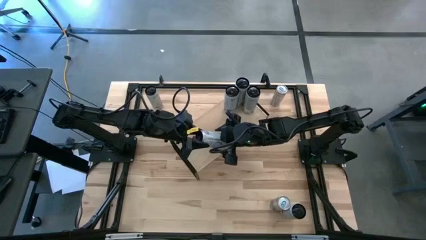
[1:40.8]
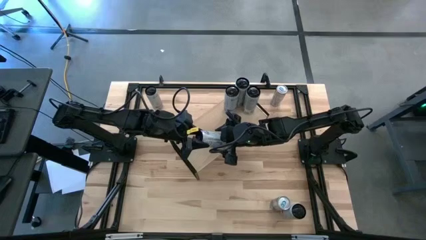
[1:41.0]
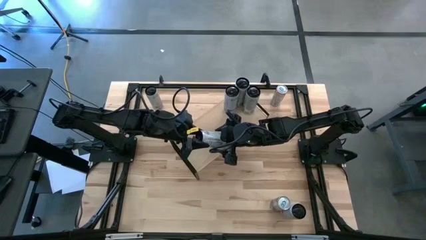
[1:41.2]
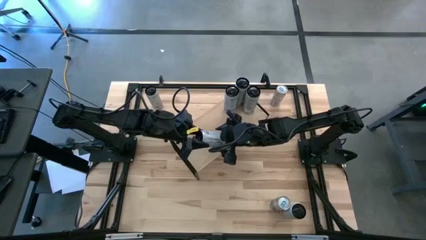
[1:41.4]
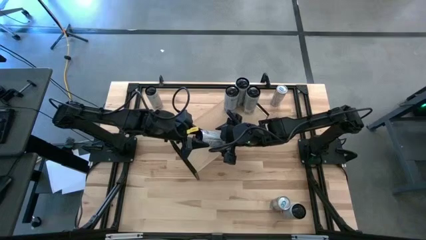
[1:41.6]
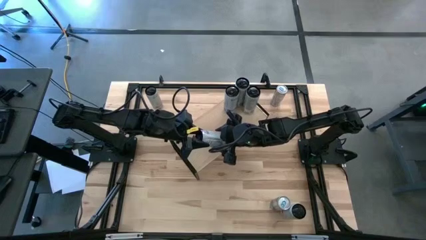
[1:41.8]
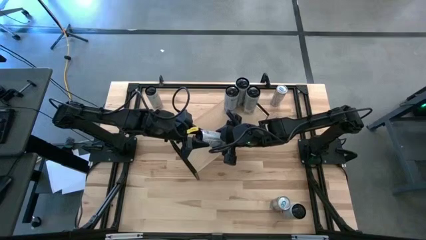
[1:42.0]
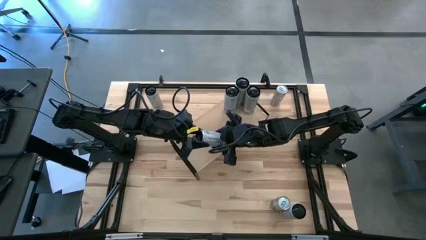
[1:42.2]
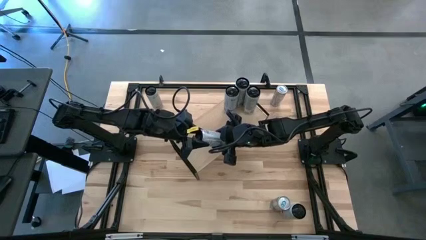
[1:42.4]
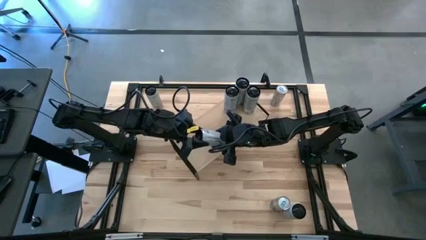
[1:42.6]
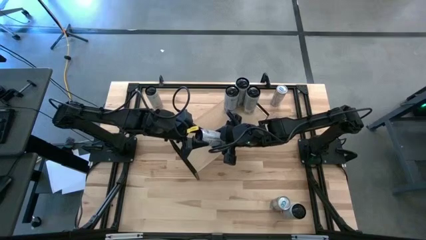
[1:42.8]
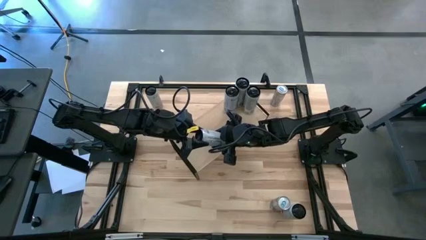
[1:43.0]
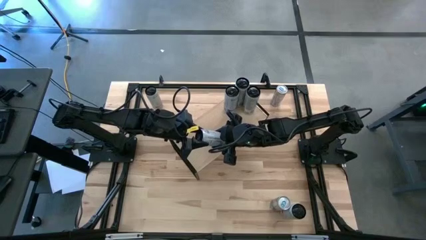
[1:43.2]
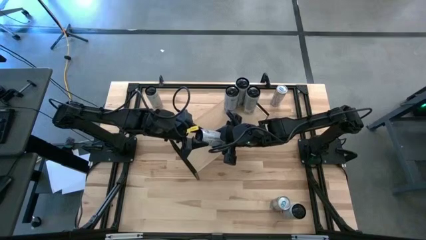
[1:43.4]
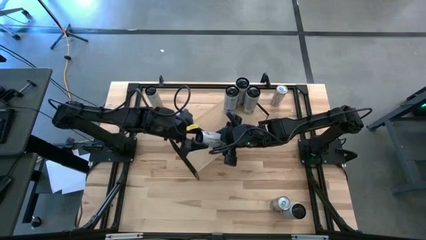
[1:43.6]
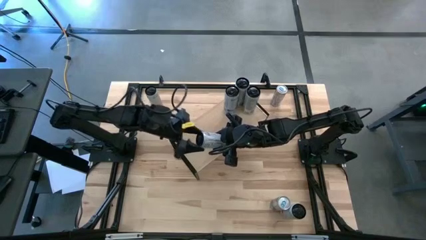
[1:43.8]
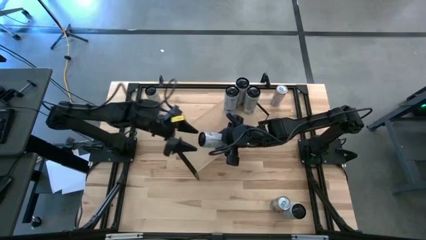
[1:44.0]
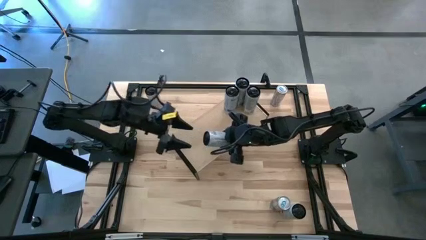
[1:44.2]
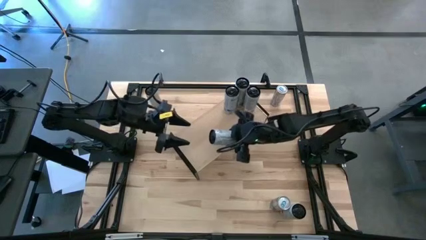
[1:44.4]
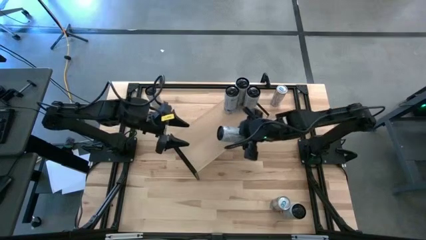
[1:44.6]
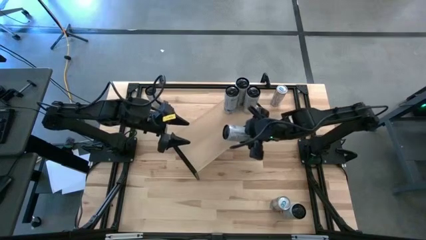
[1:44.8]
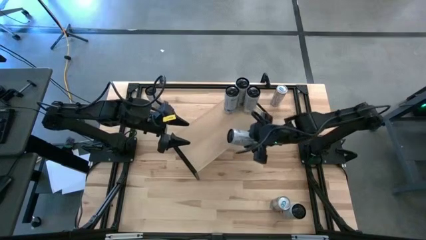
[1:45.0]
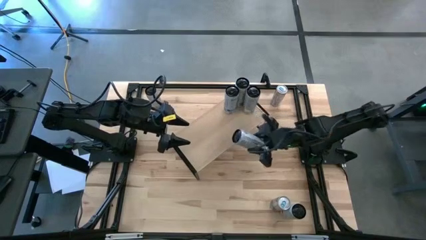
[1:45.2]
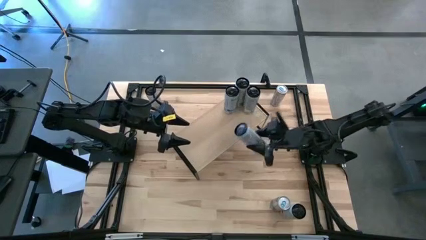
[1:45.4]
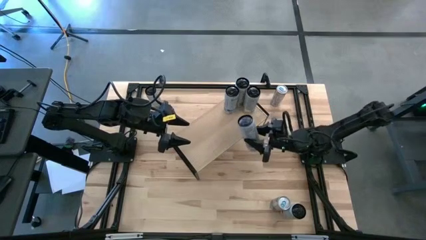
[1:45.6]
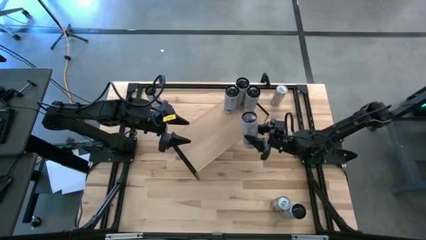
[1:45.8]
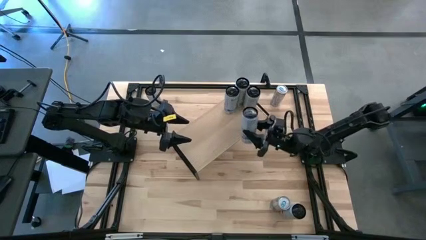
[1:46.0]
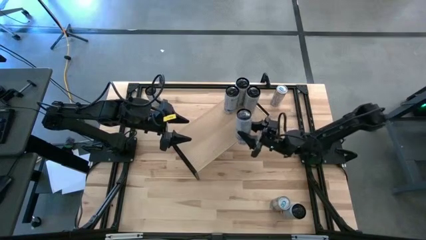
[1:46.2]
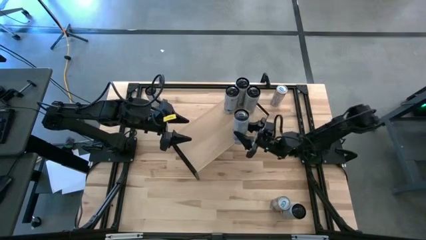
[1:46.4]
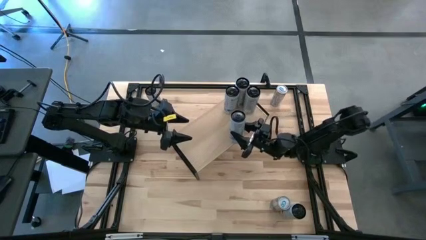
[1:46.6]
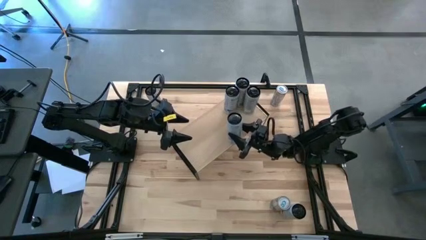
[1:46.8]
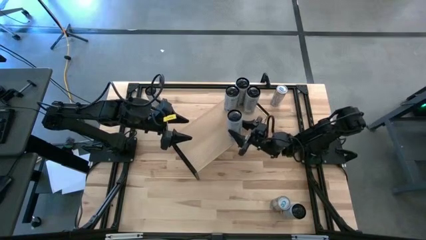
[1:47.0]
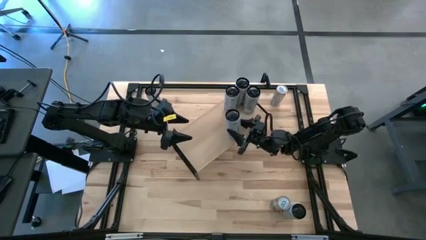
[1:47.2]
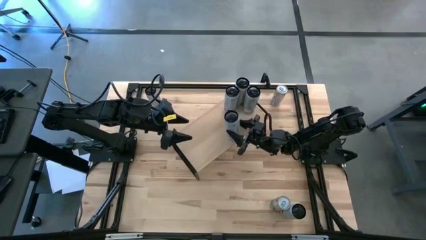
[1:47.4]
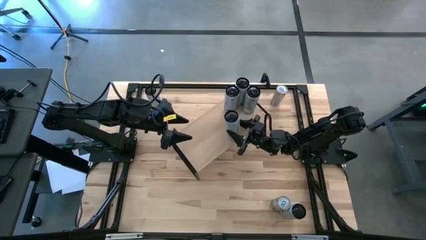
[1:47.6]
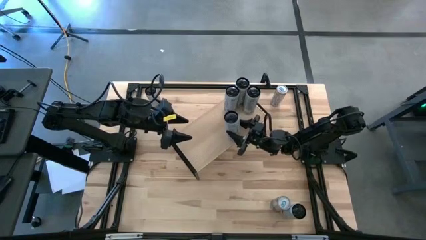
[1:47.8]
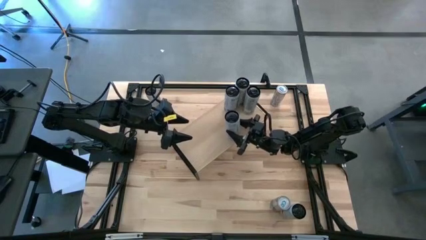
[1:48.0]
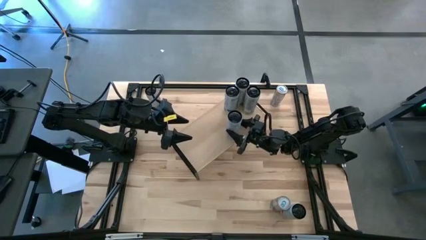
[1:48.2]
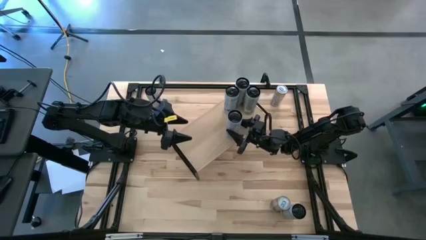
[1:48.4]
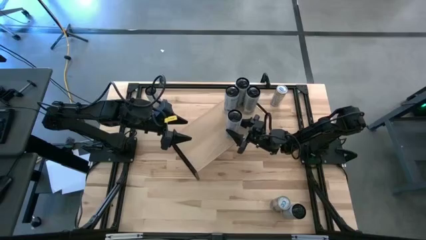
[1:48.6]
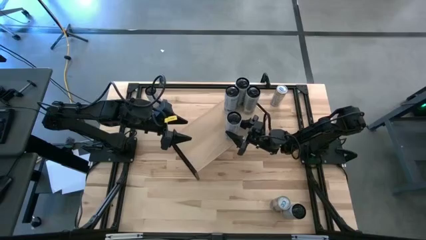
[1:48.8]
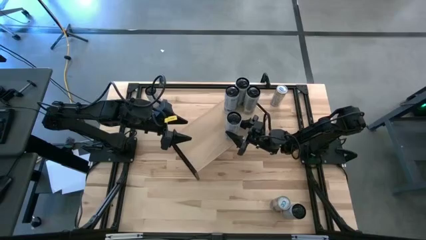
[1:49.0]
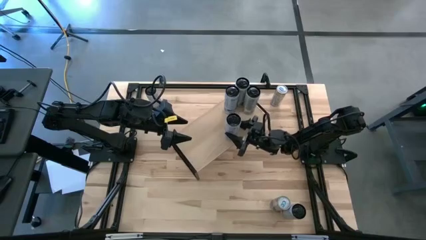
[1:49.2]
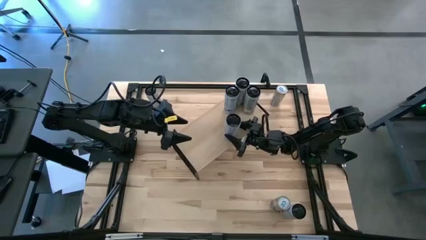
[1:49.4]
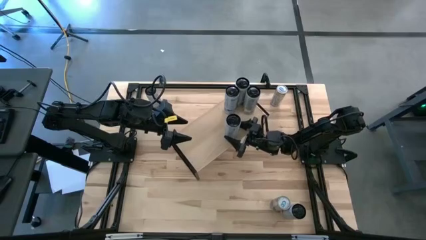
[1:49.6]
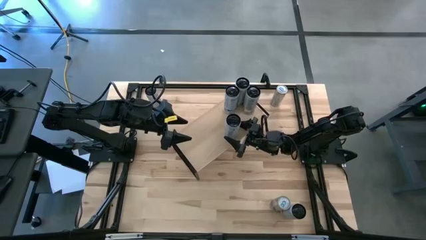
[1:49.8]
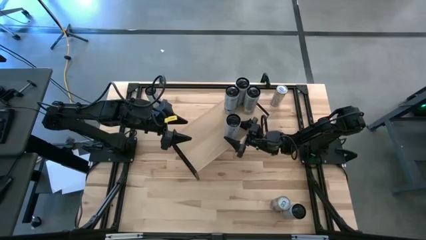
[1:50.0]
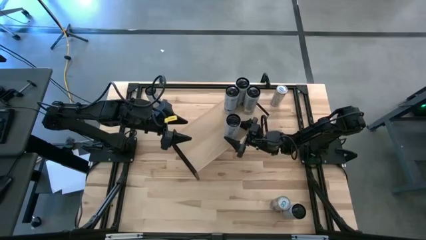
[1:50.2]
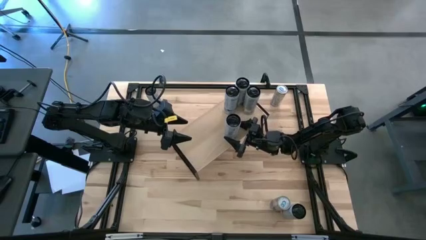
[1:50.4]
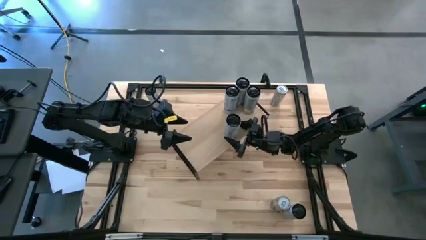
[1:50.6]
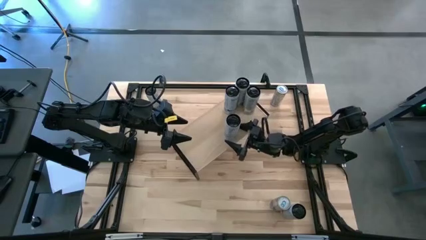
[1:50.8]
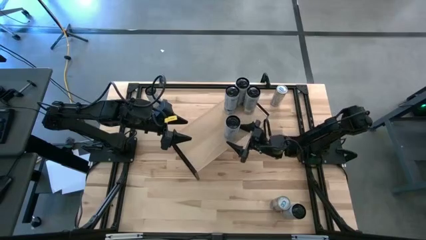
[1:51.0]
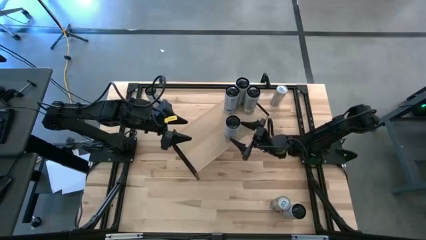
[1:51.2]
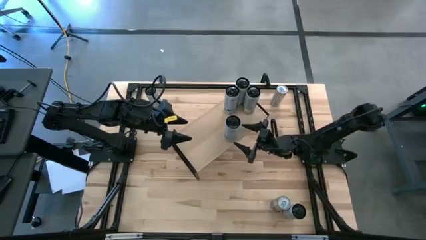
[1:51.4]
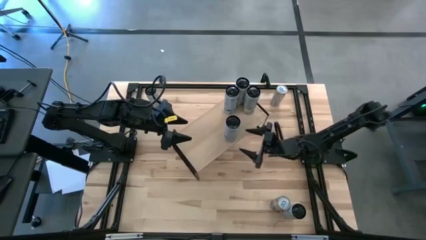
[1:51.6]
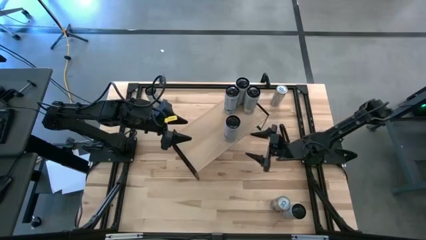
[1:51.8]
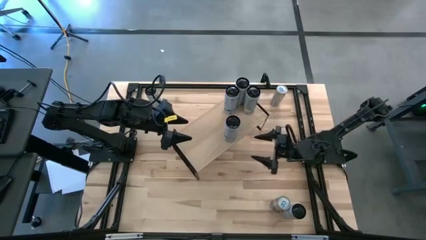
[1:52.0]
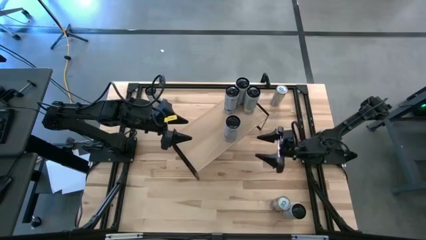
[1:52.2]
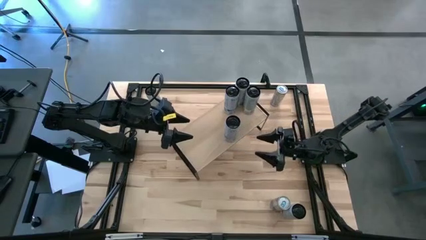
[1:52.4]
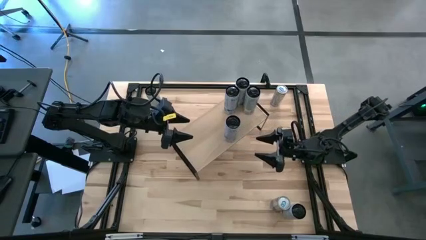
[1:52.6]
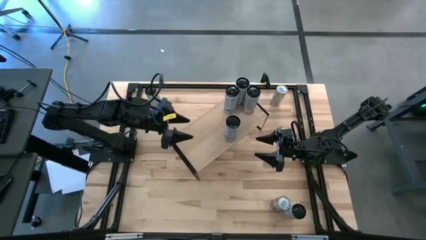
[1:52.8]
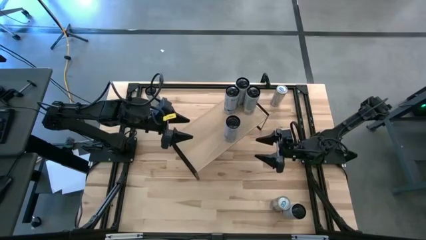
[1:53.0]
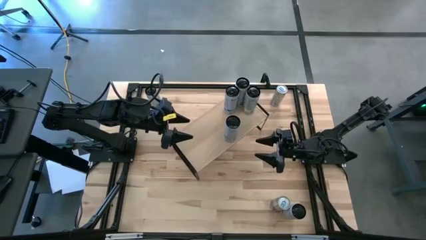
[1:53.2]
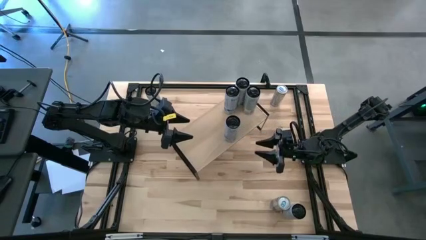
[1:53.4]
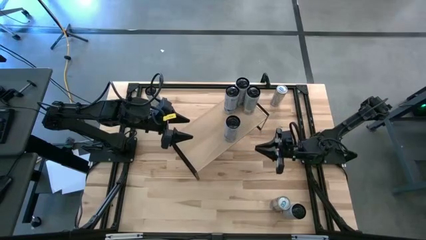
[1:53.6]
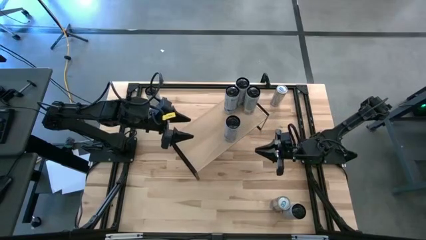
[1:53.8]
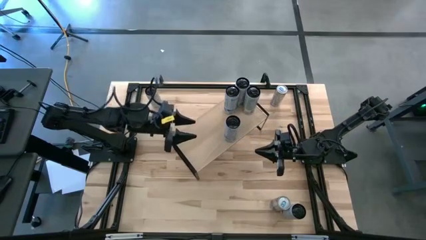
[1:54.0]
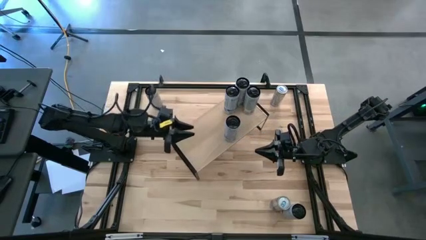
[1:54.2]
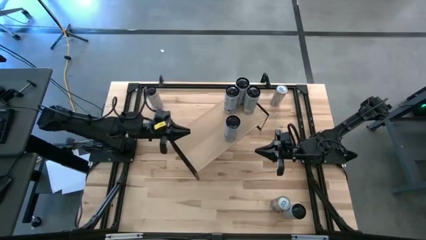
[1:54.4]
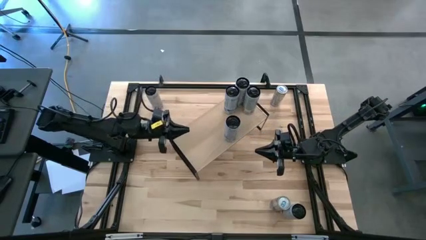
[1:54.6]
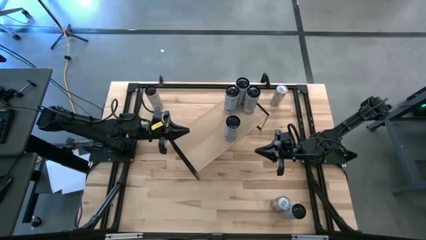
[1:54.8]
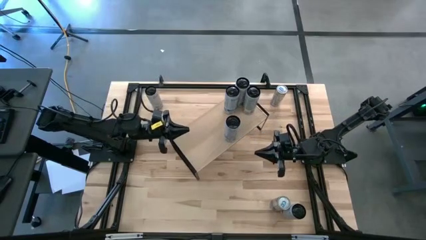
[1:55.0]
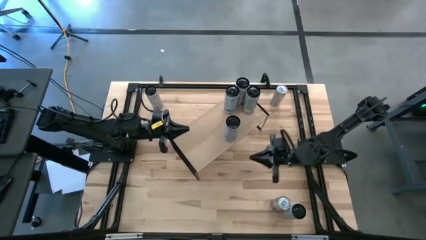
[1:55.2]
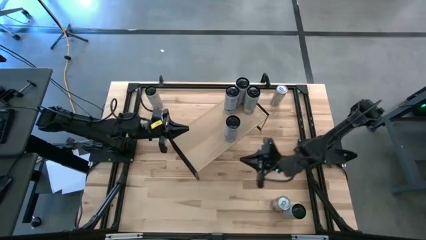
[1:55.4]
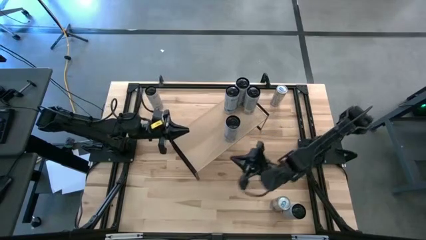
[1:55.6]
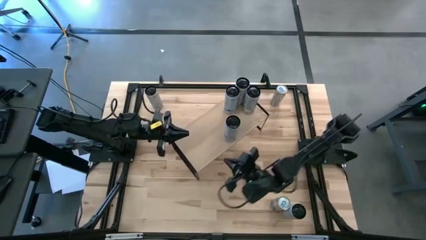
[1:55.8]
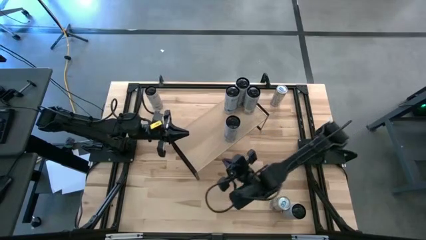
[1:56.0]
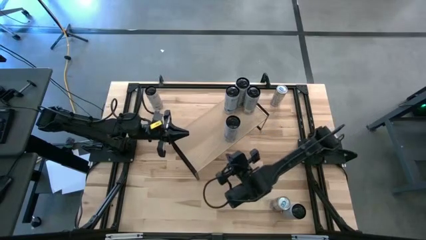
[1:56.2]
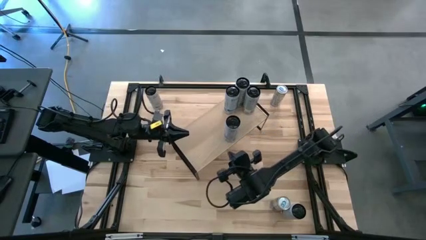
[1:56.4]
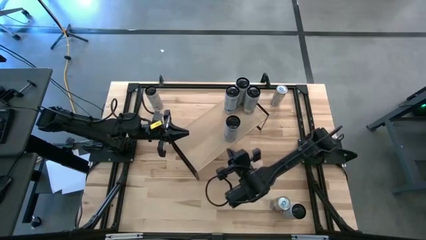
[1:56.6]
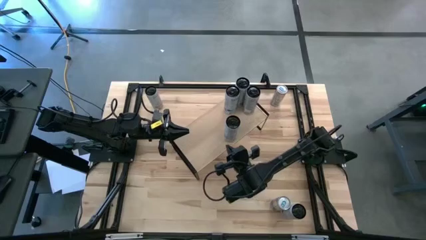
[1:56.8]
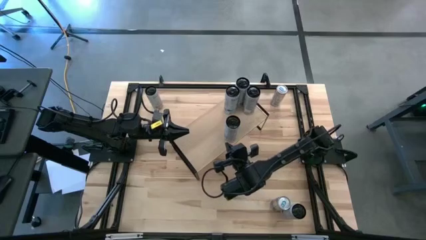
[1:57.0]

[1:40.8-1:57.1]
Task: Place canned beverage on shelf
Put the white-blue soda can on the shelf and align it with the other white-blue soda can
